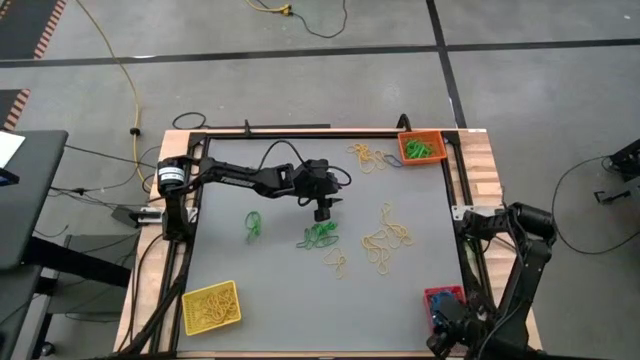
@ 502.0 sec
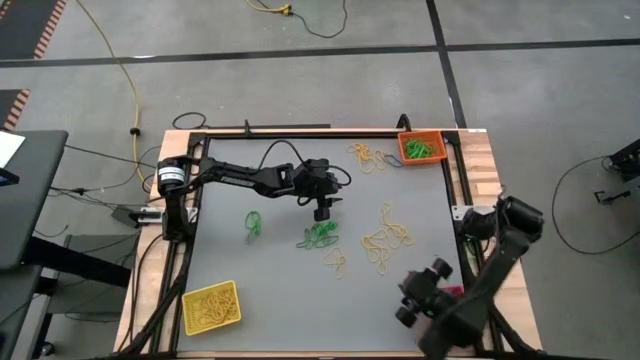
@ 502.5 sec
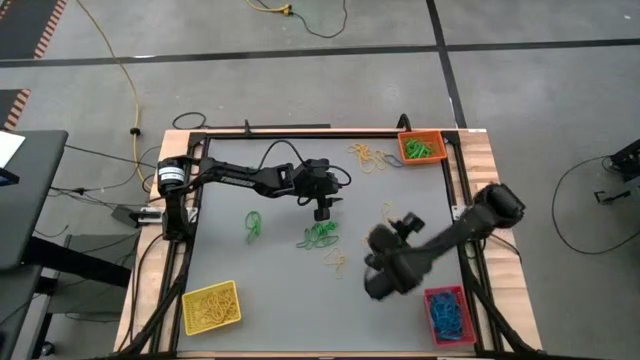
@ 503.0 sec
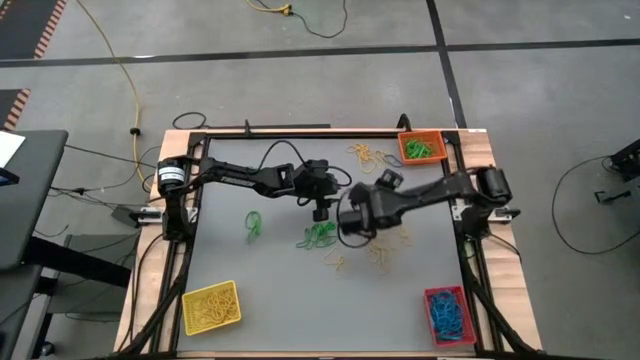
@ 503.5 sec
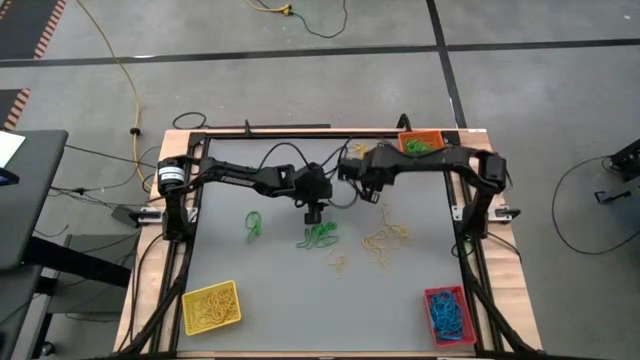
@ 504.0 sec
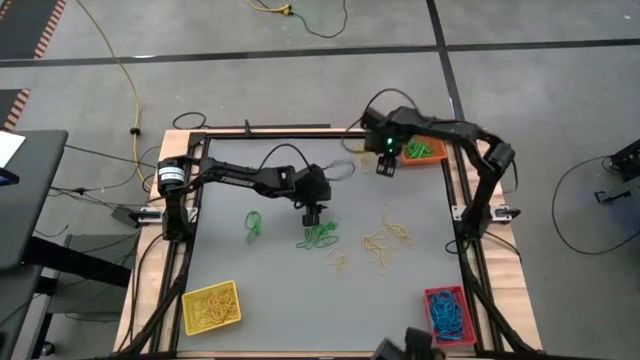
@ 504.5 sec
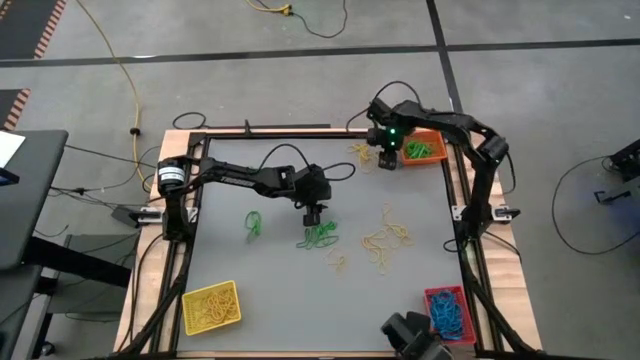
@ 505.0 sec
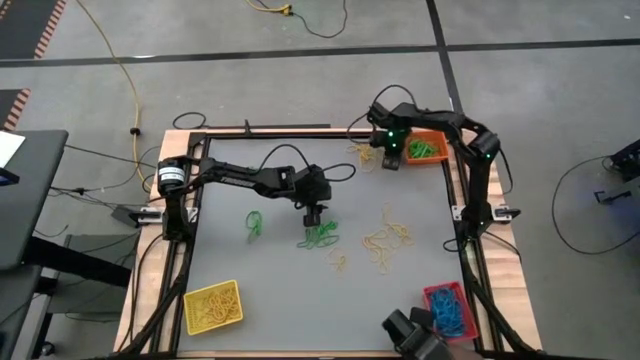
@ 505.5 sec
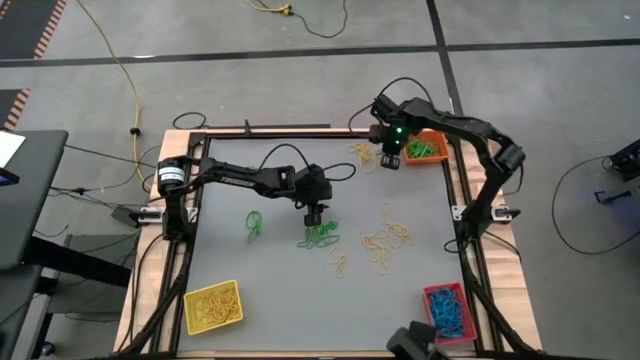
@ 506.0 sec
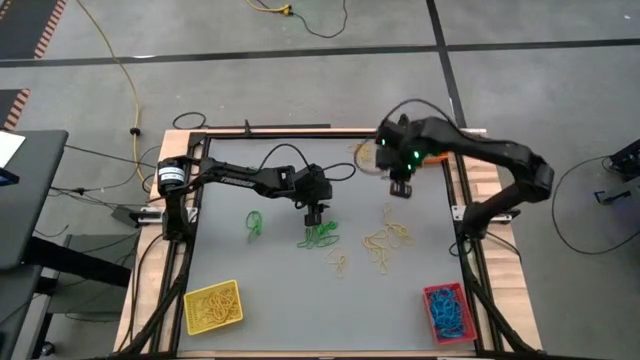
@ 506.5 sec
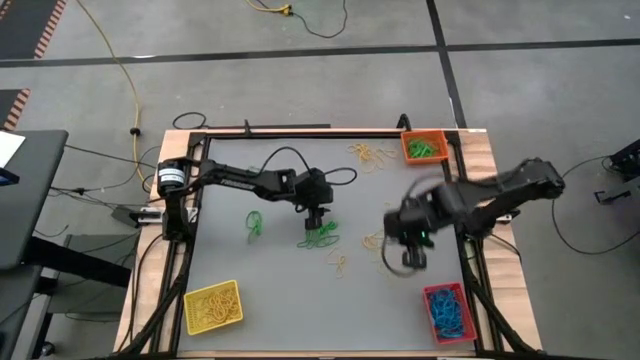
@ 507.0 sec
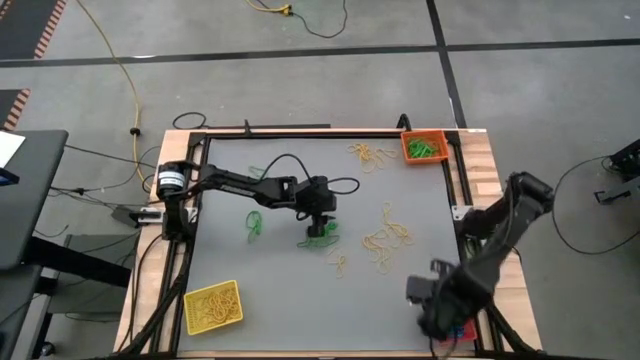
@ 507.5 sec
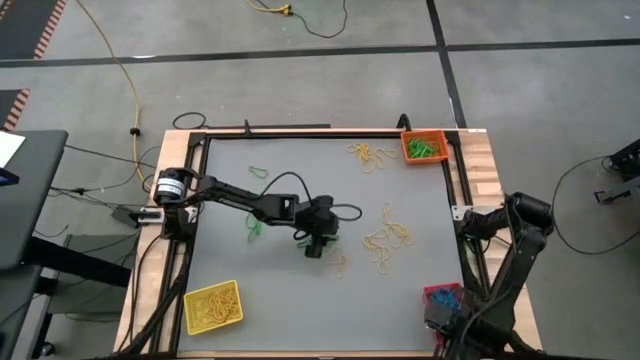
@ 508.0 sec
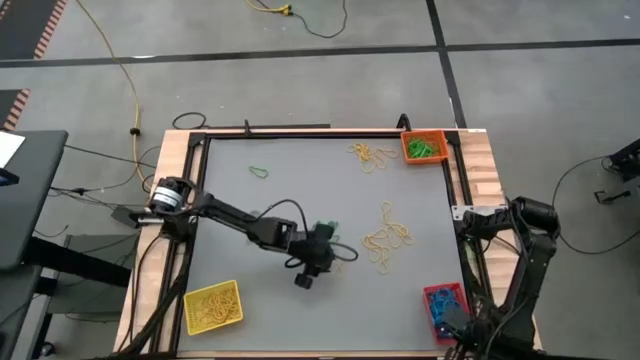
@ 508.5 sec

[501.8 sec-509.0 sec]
Task: Sort rubber bands into baskets
Put the blue rubber band into the red bin

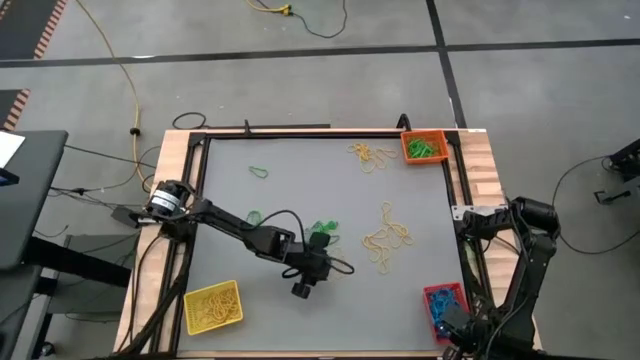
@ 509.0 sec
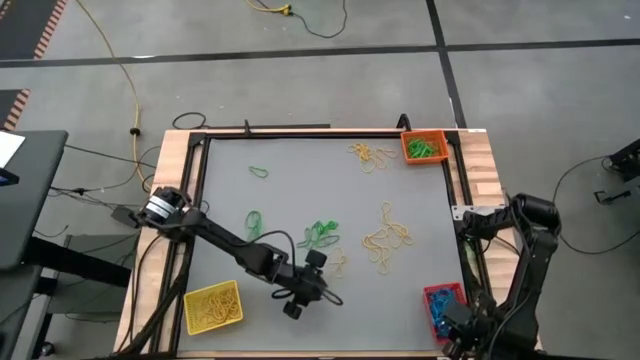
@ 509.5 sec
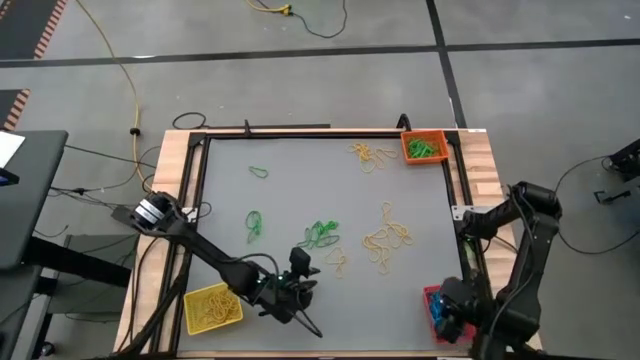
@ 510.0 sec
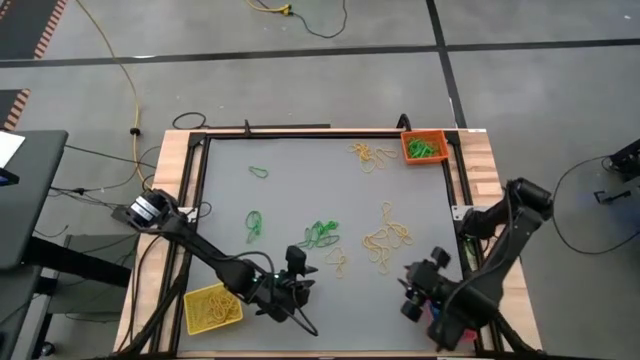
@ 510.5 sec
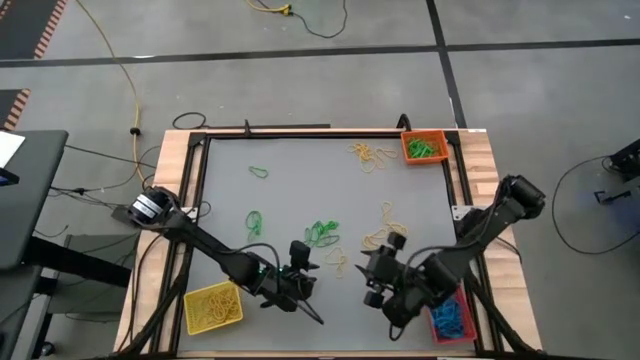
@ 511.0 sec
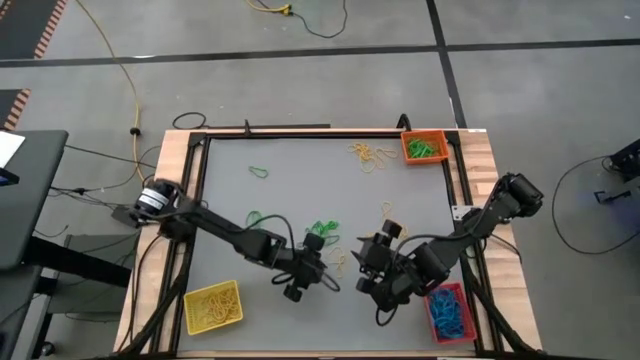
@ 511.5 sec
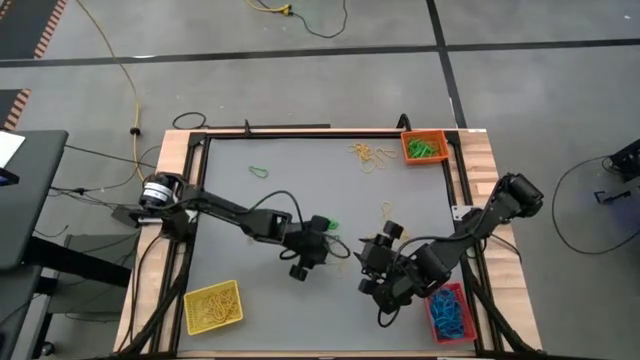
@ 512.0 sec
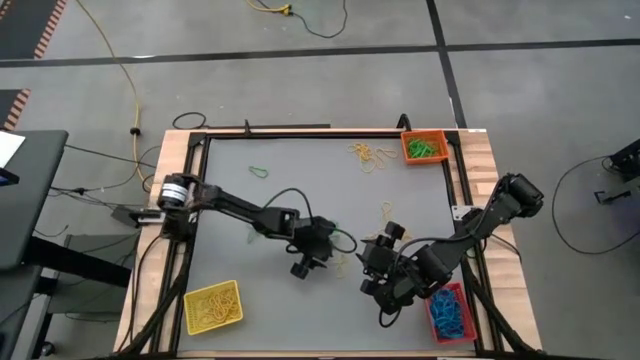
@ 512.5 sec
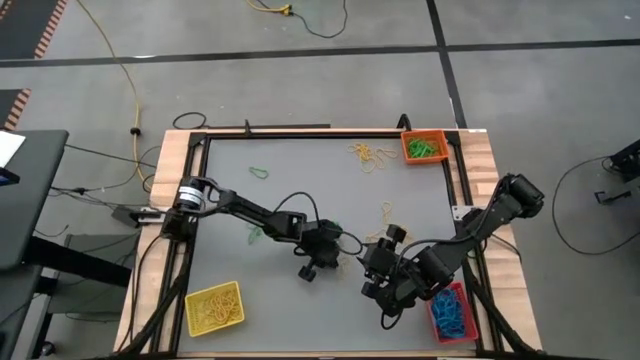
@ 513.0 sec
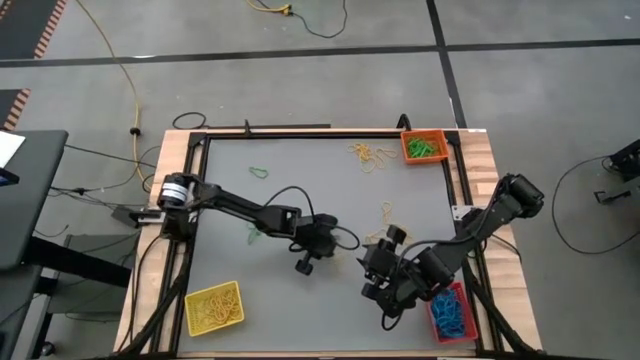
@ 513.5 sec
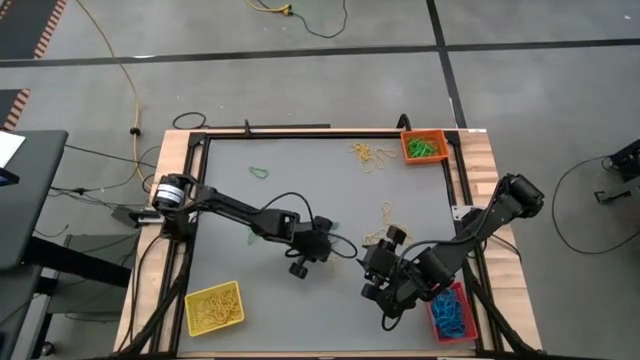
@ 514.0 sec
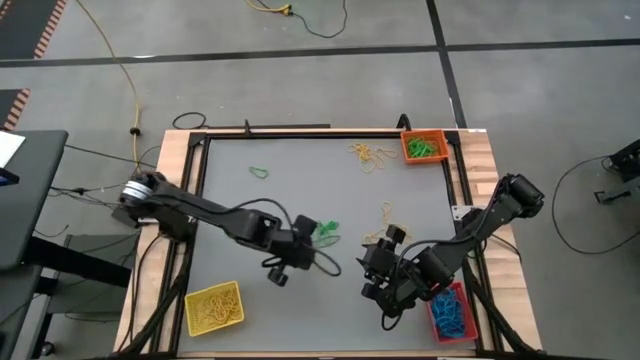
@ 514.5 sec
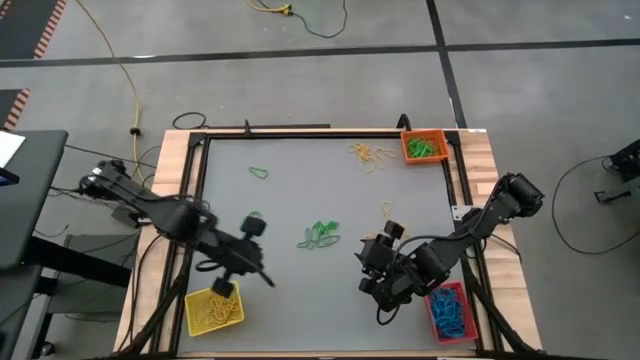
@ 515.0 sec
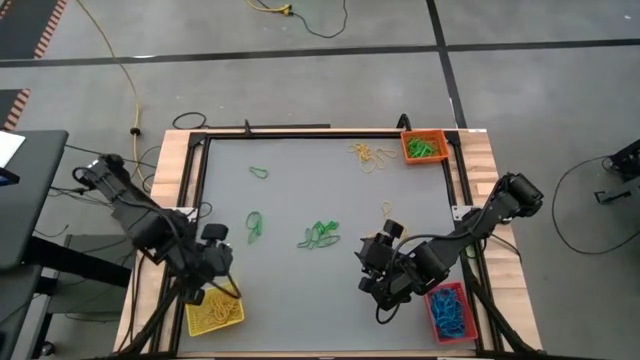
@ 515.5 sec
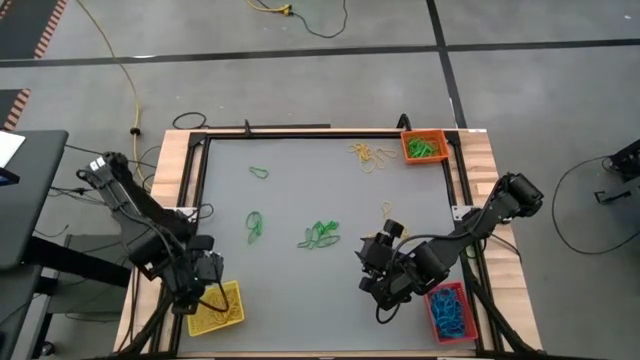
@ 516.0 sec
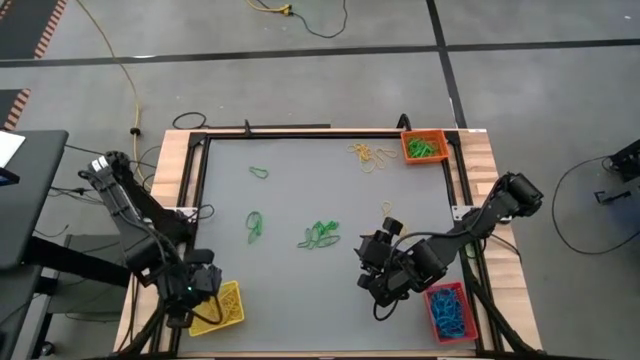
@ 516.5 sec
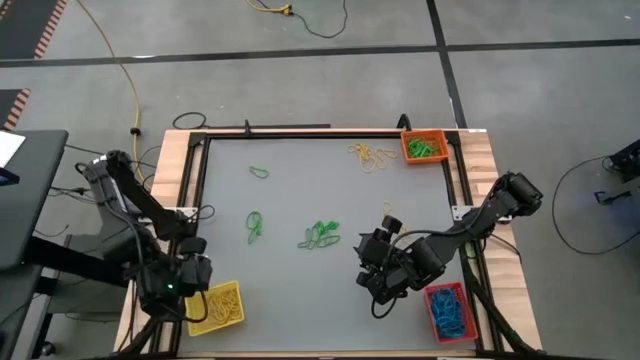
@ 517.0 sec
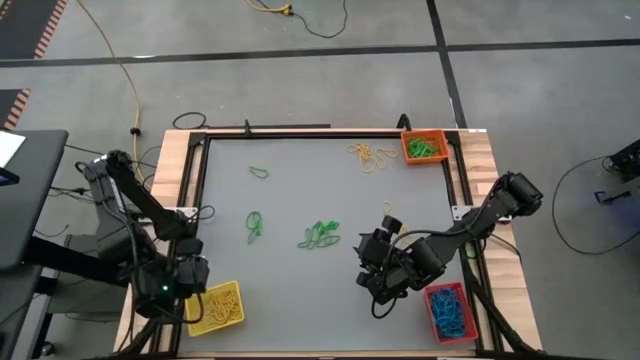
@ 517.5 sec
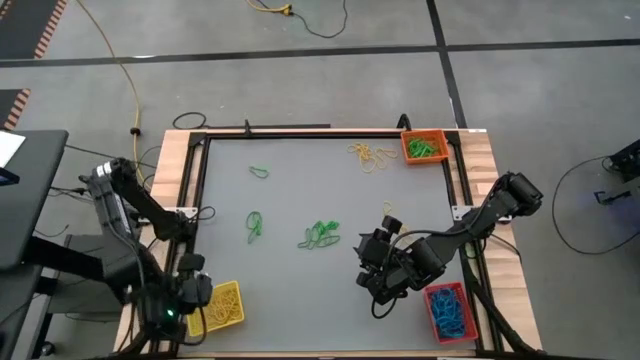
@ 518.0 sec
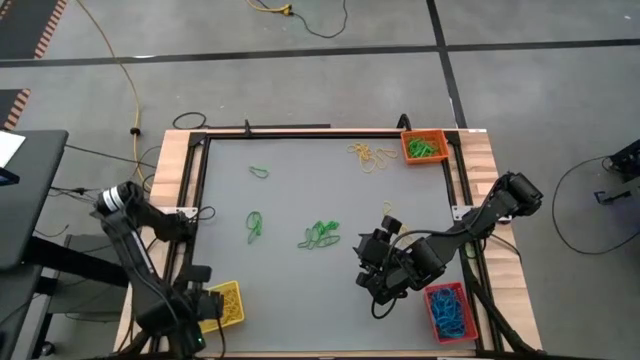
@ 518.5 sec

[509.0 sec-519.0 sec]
Put the yellow rubber band into the yellow bin

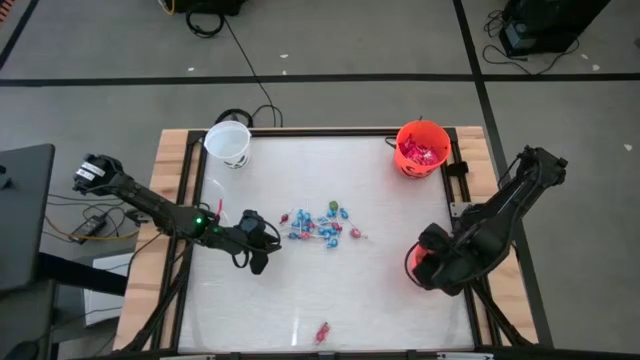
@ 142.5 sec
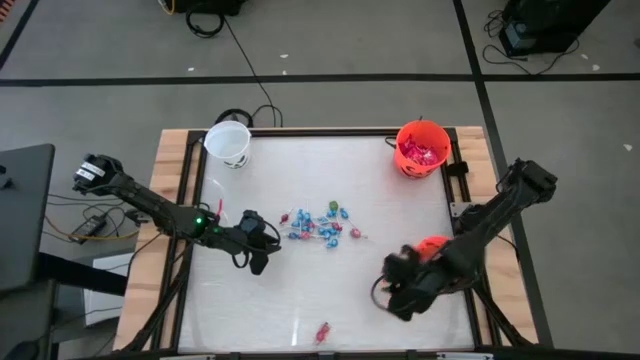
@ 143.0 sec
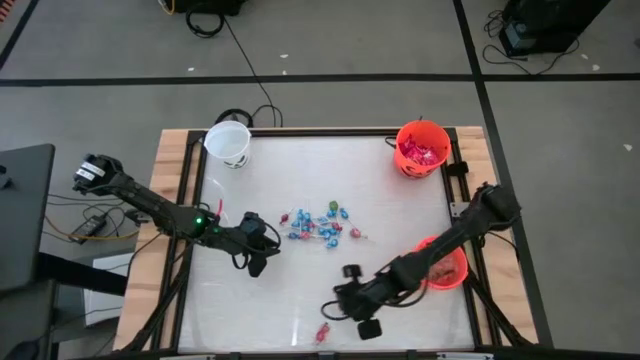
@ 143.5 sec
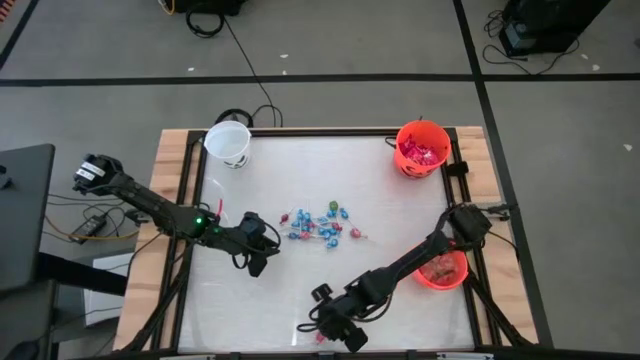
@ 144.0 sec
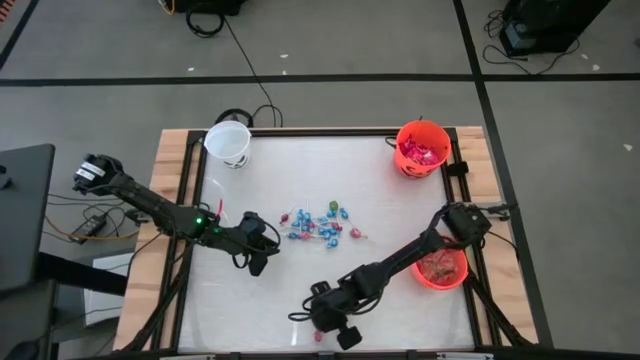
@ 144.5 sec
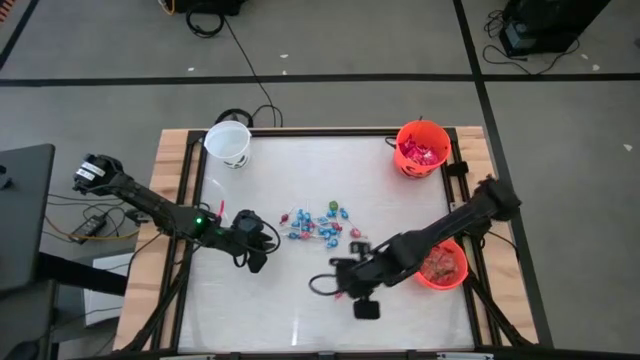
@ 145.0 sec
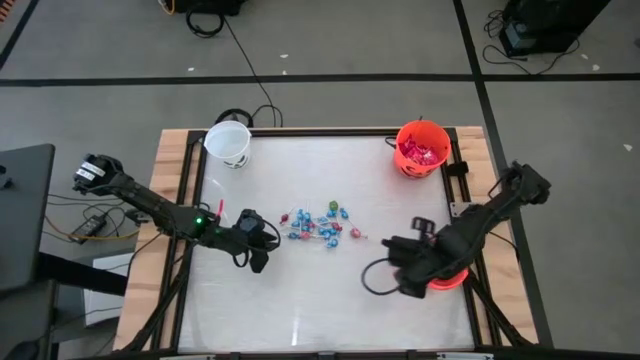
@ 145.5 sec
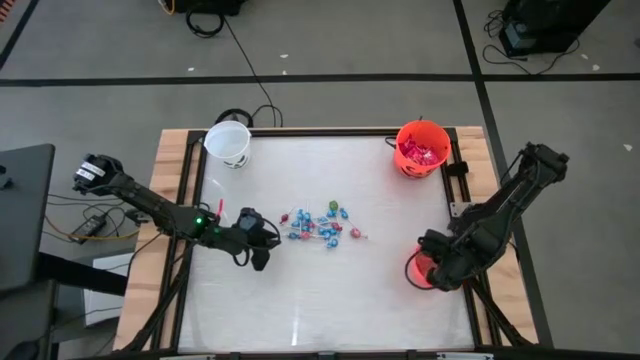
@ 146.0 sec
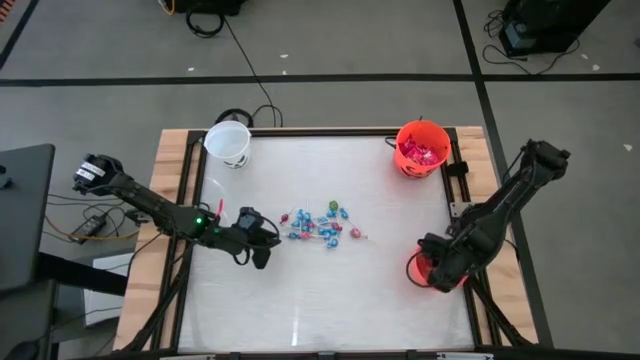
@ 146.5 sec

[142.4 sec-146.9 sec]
Task: Sort candy by brand, put in halloween buckets
Put the red gummy into the bottom orange bucket
